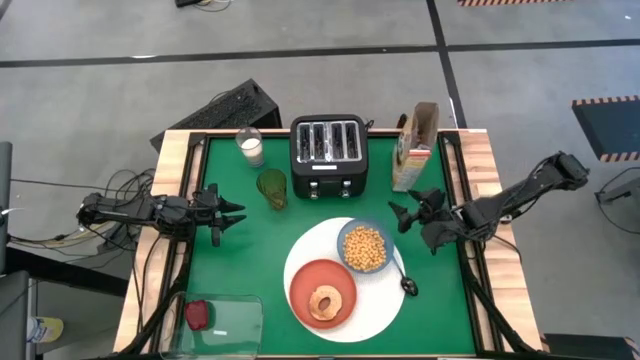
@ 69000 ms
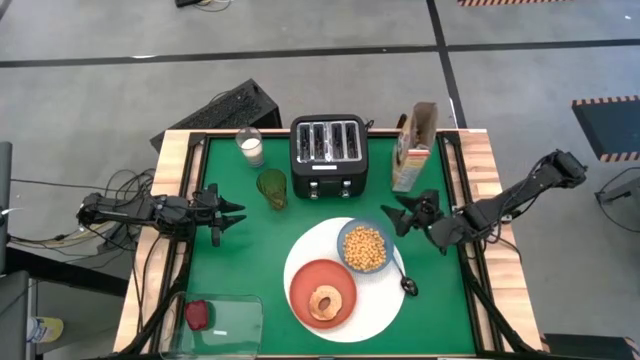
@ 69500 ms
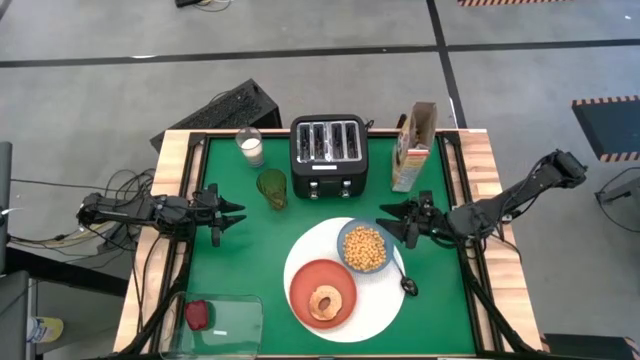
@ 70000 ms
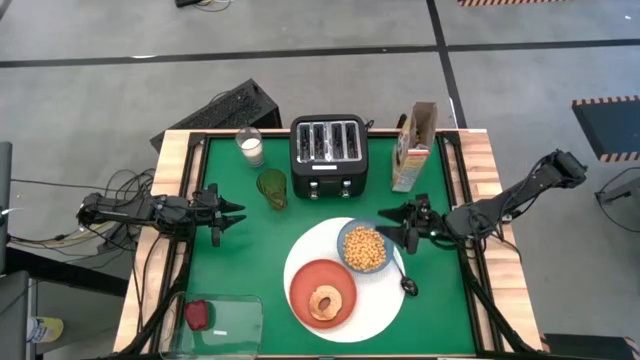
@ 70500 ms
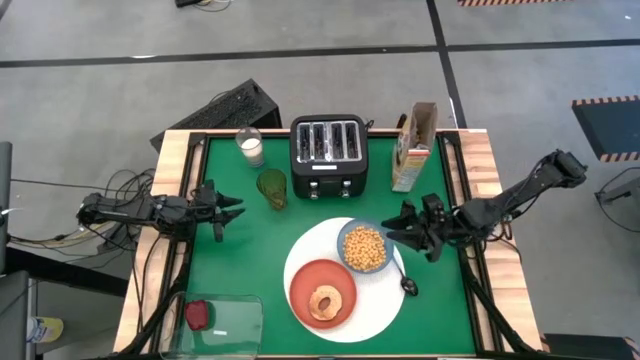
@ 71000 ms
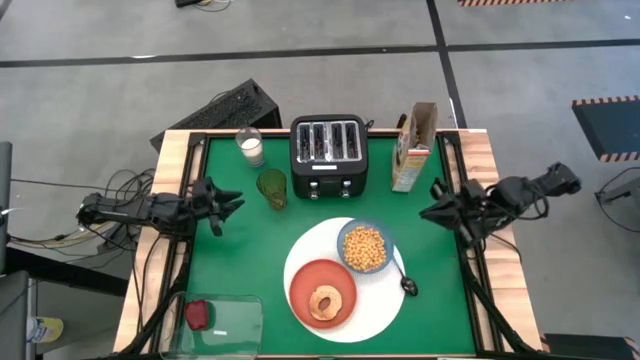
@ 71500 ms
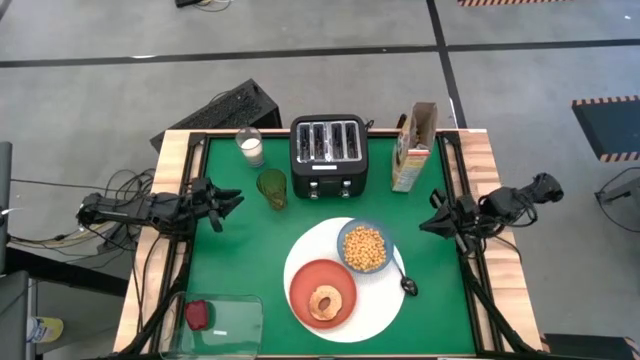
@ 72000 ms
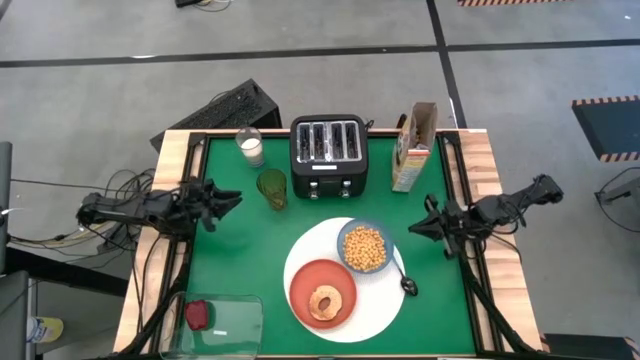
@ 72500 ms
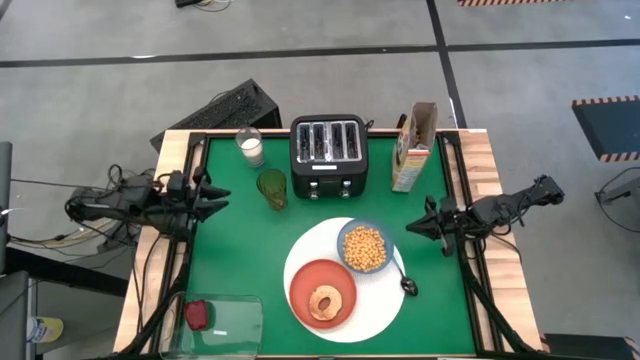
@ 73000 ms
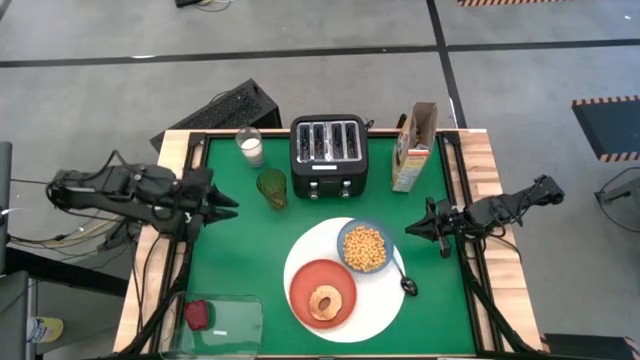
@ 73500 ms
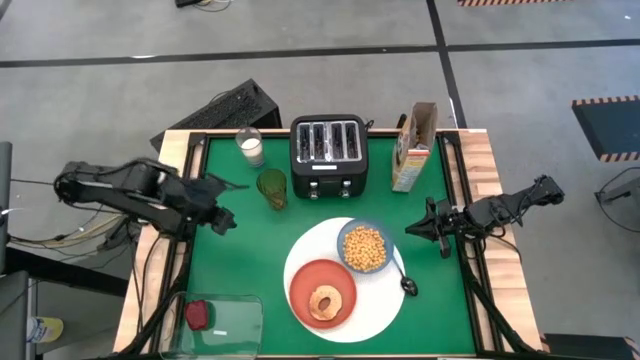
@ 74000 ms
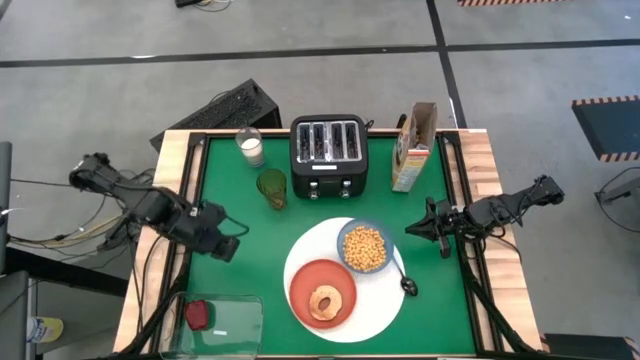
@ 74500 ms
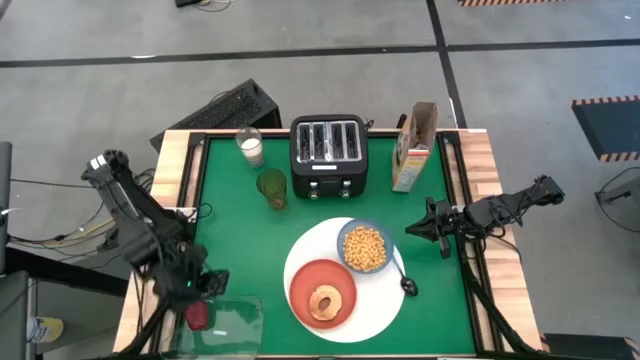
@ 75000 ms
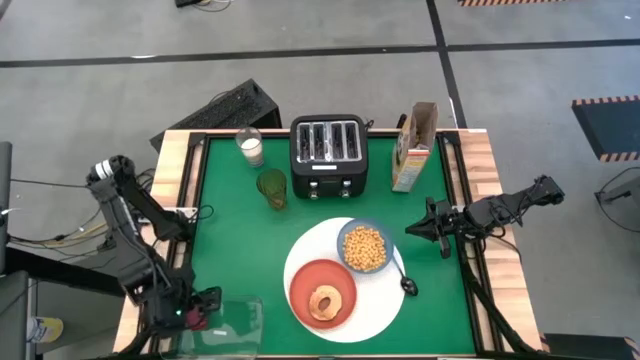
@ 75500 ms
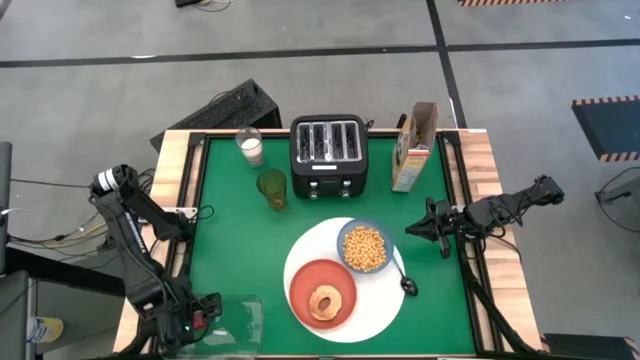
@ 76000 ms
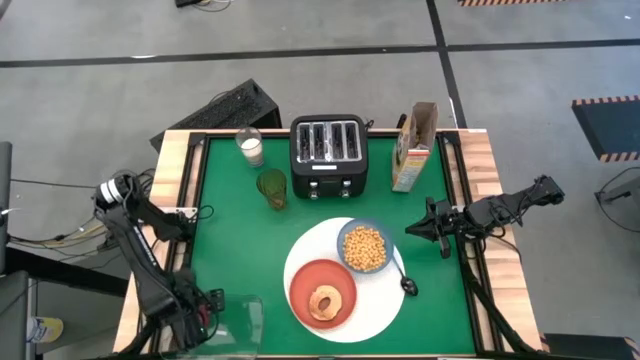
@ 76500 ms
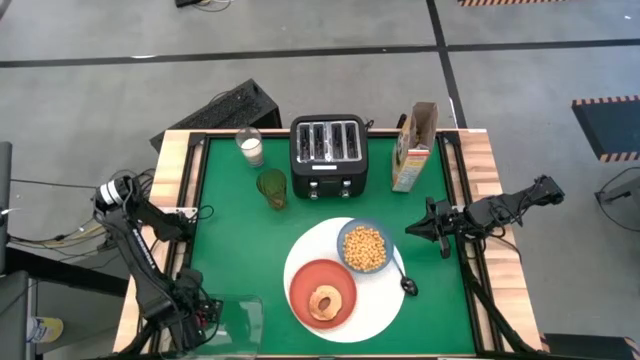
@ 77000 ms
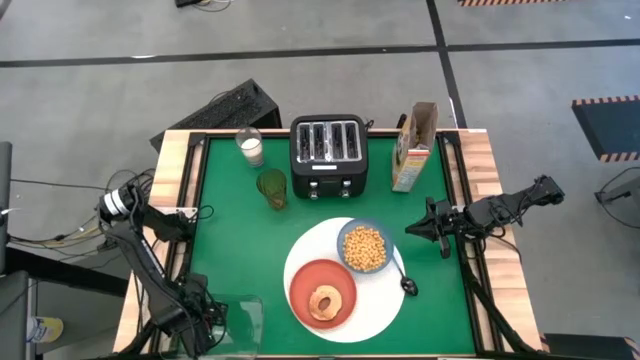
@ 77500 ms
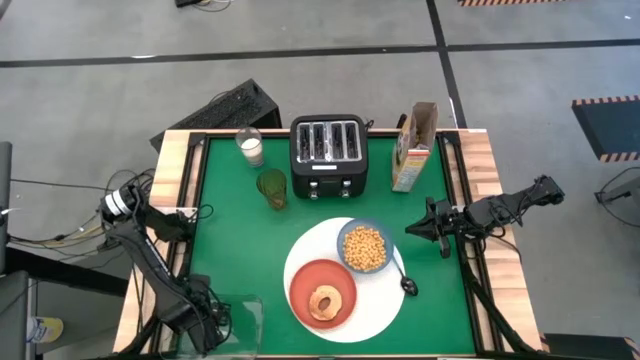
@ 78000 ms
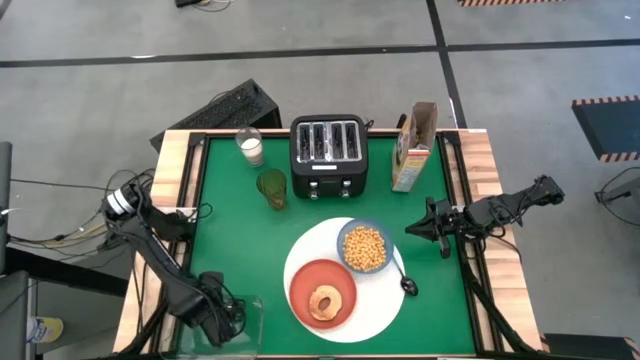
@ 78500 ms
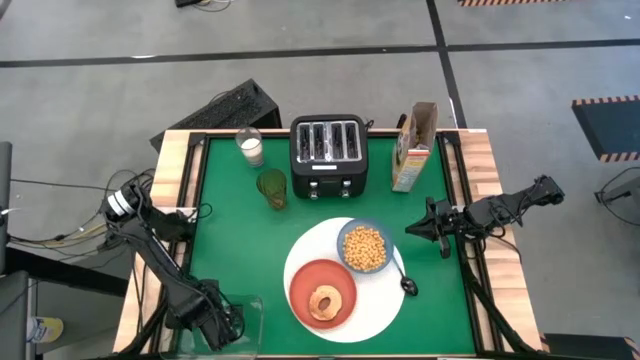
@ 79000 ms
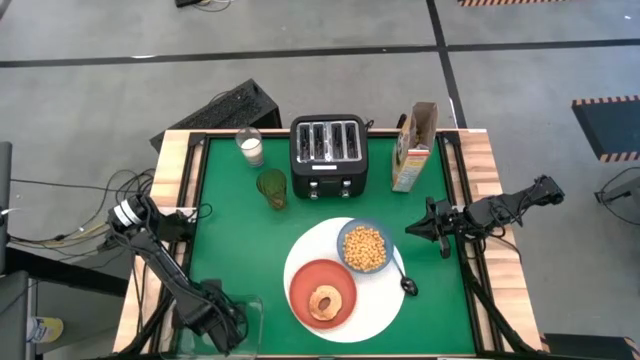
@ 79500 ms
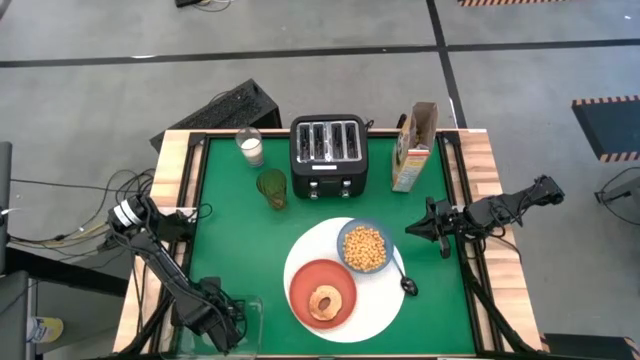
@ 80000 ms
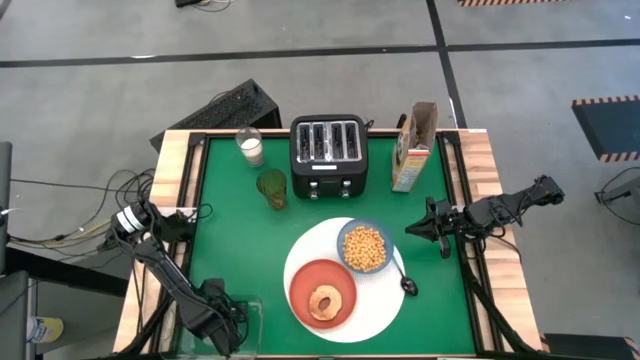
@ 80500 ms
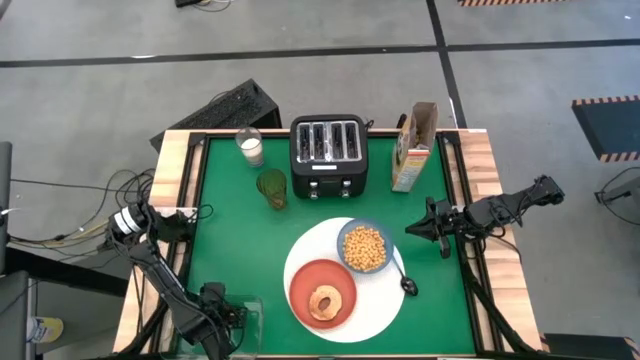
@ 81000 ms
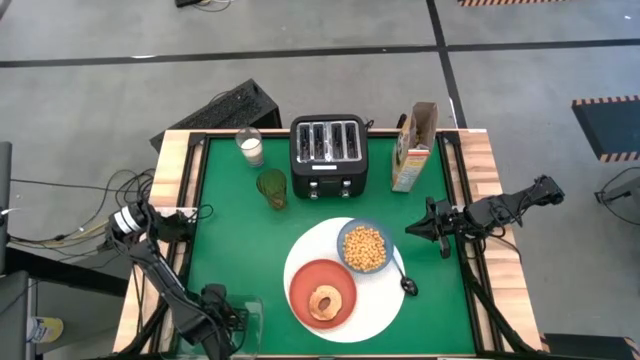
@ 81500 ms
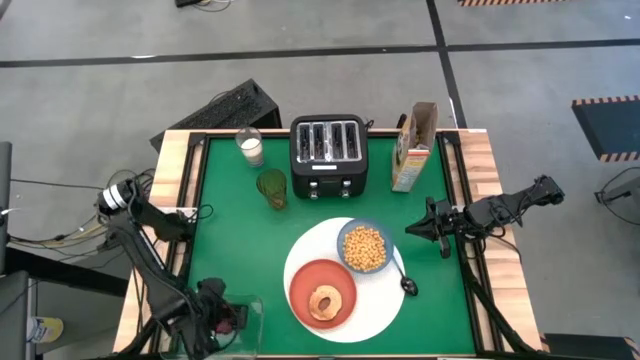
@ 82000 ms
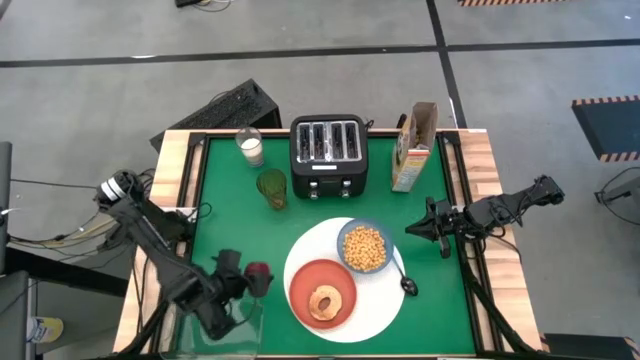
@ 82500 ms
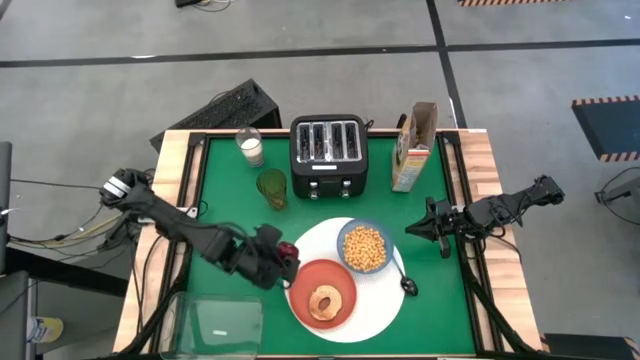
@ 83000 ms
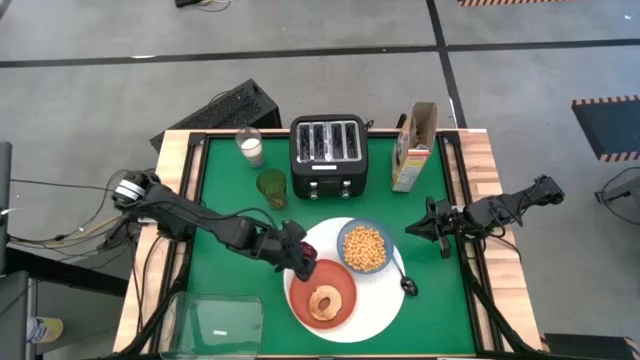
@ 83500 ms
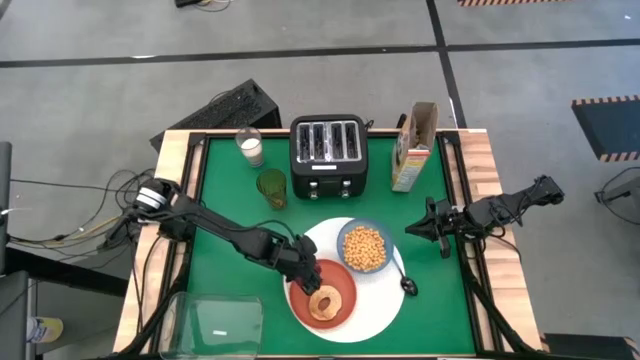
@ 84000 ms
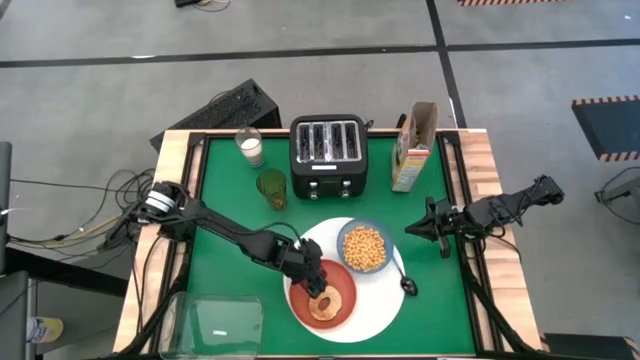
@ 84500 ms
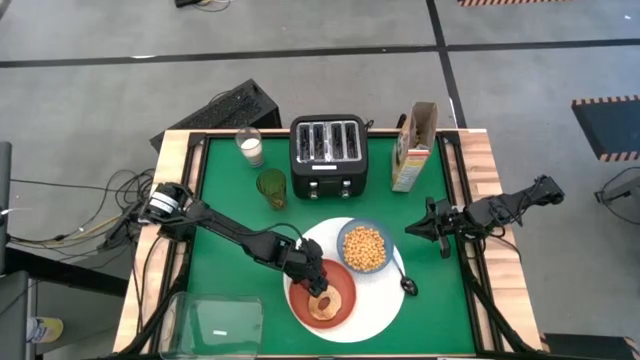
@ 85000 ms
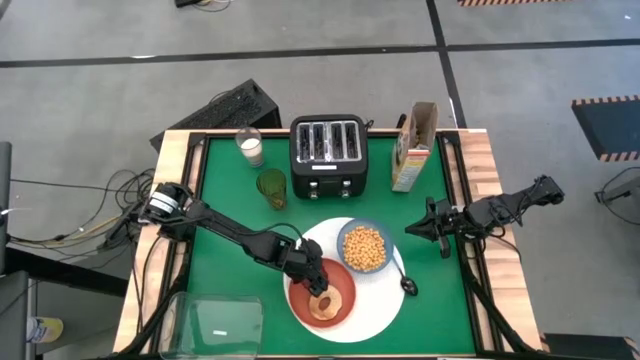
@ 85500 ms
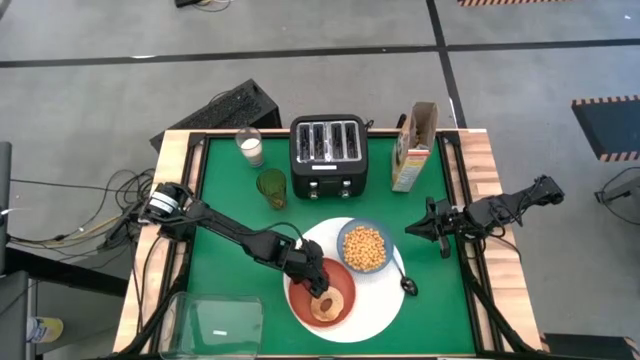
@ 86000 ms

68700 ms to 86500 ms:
Task: Arrange a breakfast setting
Put the apple on the orange plate

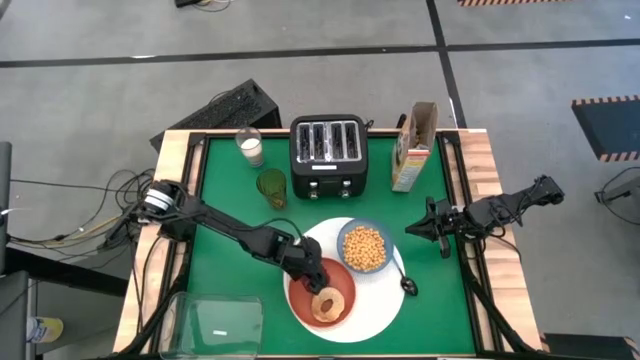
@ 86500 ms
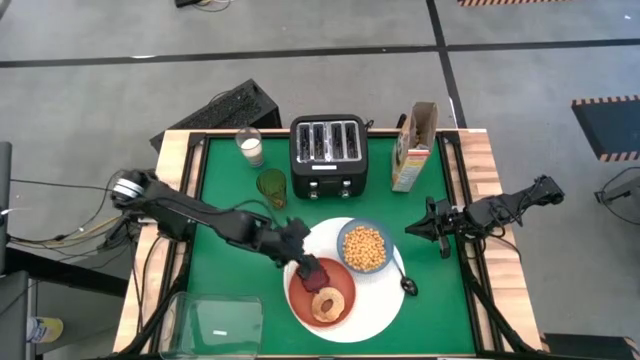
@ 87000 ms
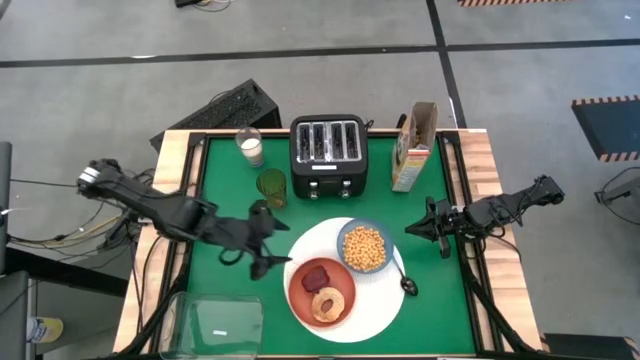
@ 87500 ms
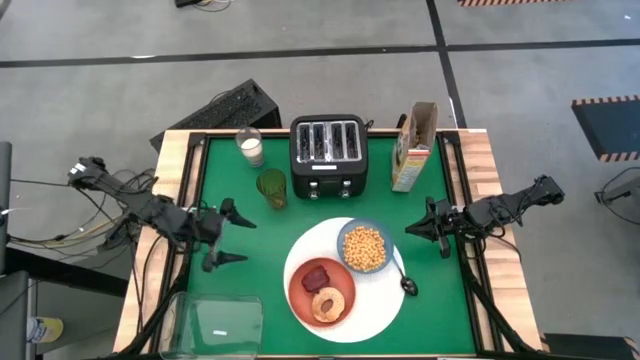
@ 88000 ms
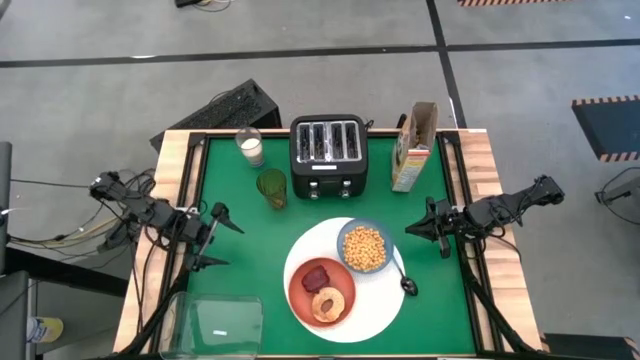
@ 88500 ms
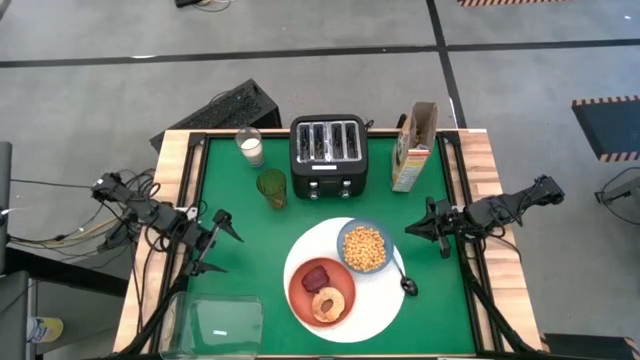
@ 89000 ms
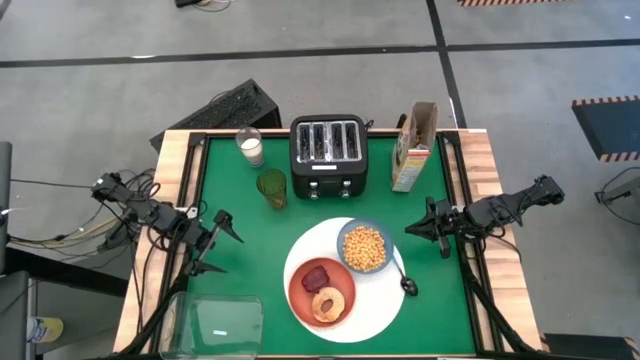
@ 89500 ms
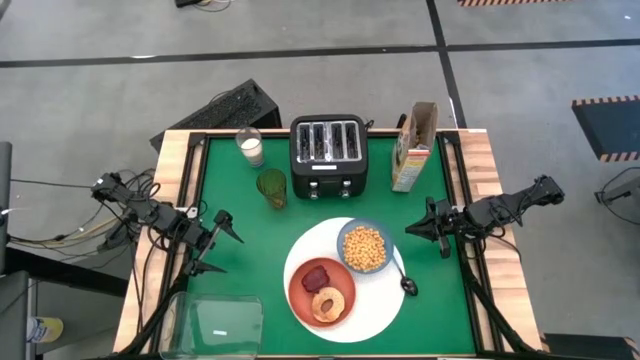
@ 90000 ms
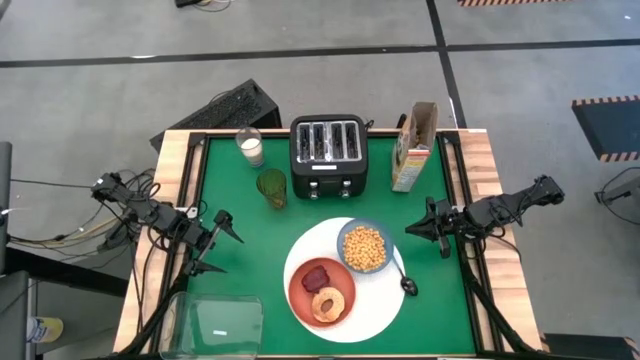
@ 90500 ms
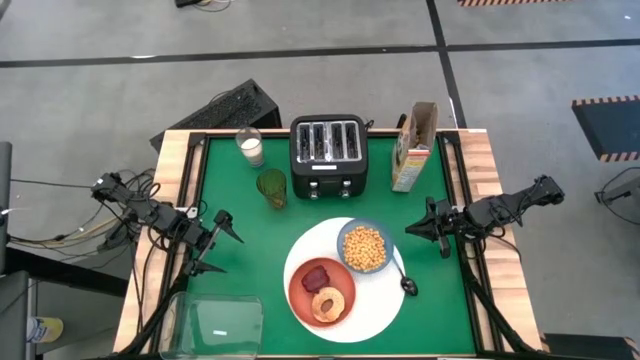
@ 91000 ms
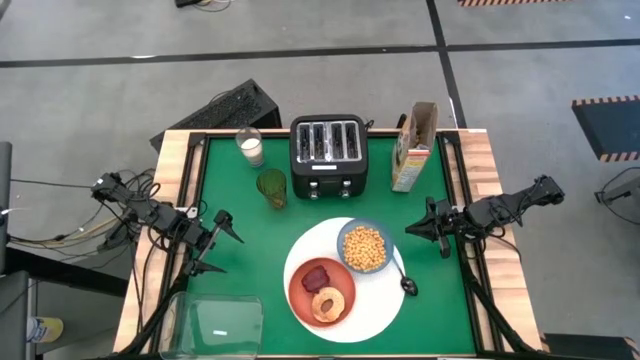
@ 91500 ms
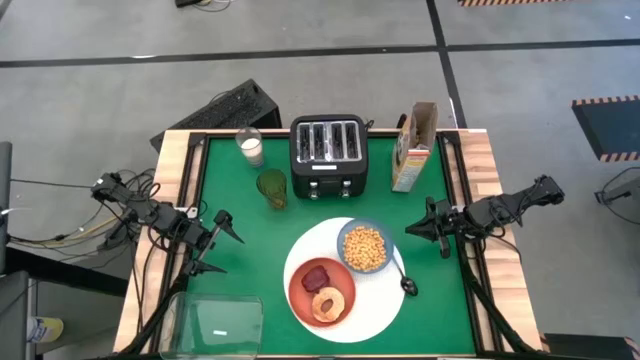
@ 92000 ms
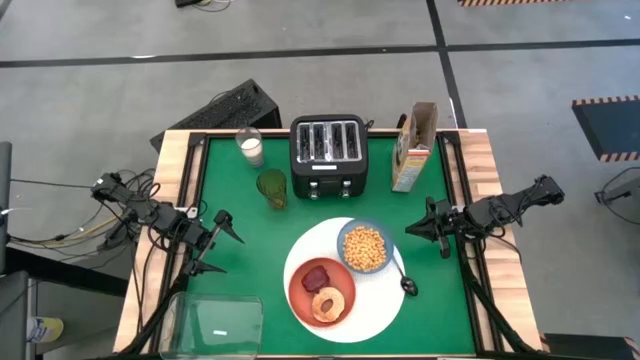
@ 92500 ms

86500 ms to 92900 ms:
Return to Home Position
